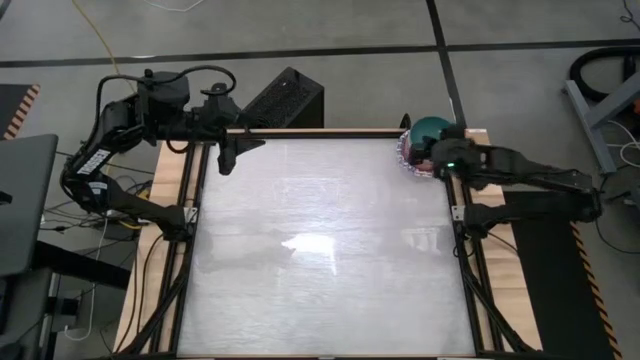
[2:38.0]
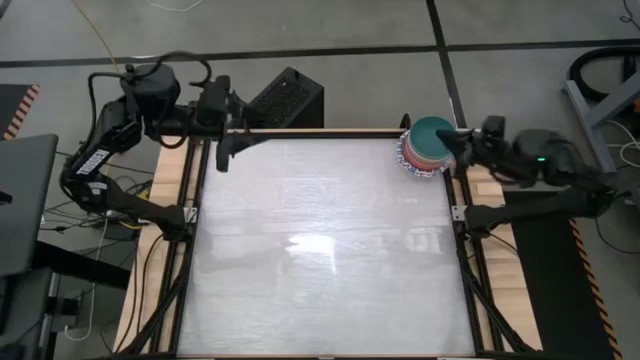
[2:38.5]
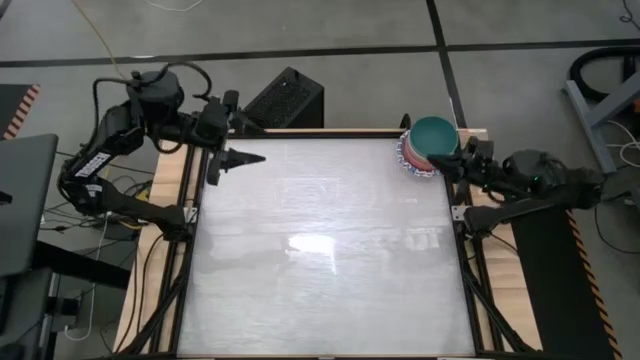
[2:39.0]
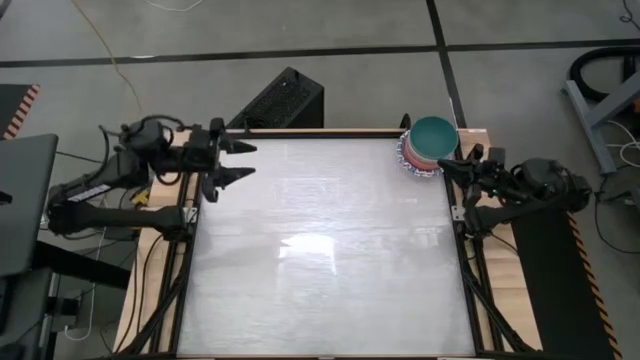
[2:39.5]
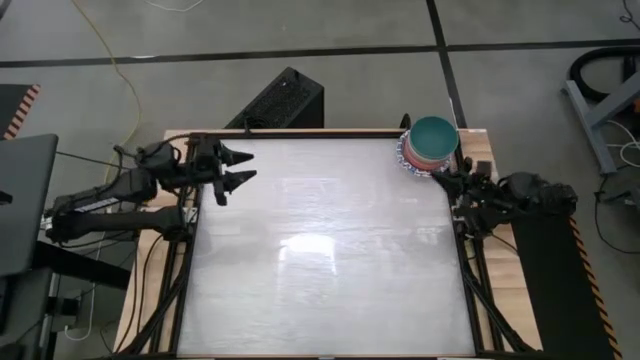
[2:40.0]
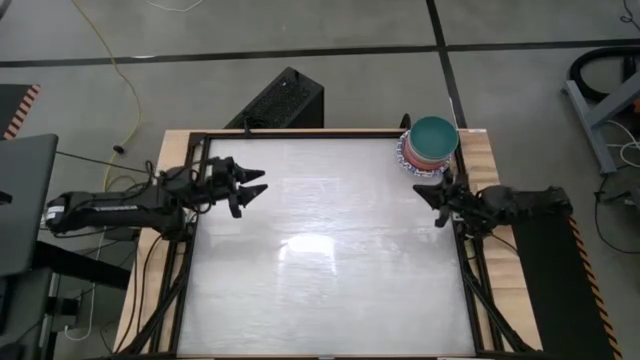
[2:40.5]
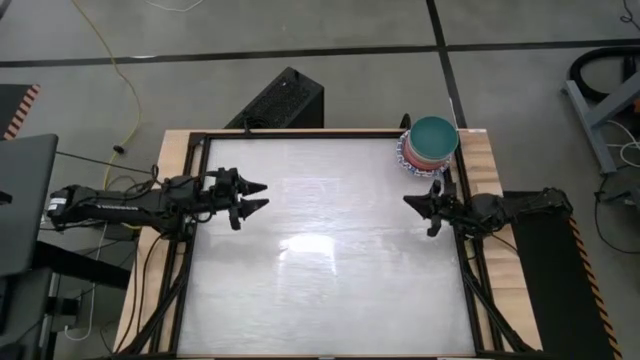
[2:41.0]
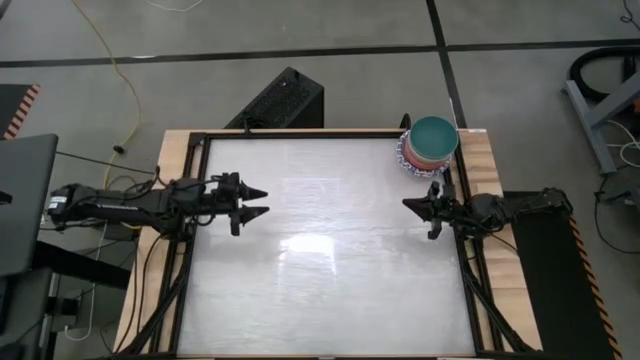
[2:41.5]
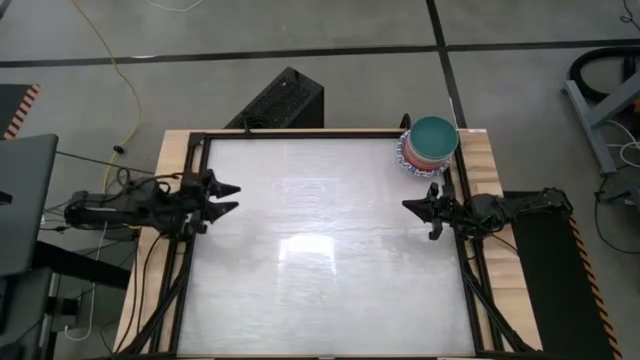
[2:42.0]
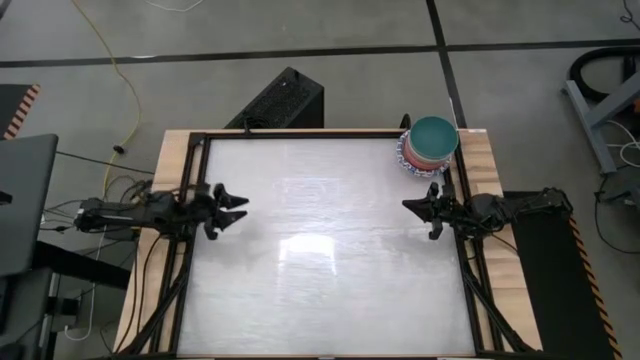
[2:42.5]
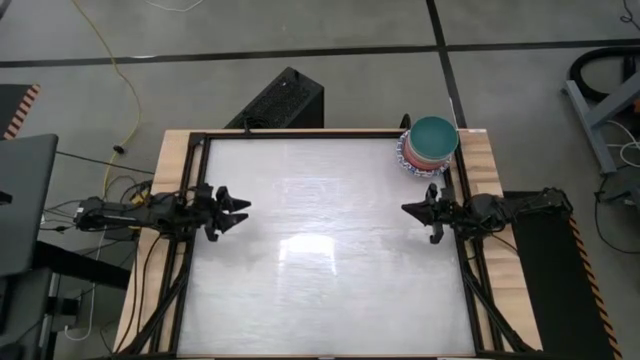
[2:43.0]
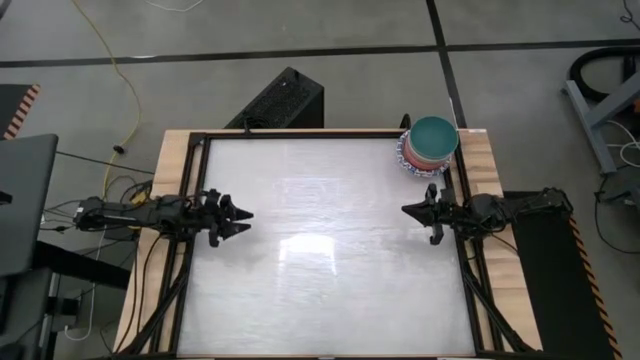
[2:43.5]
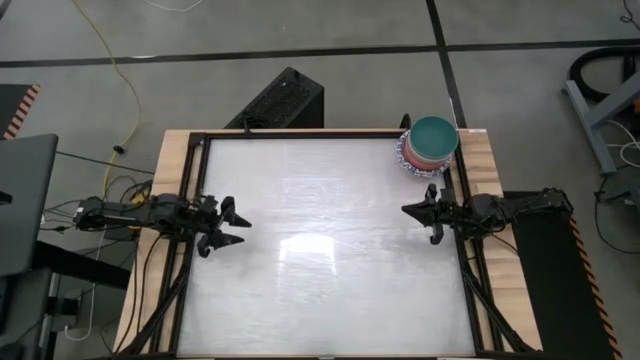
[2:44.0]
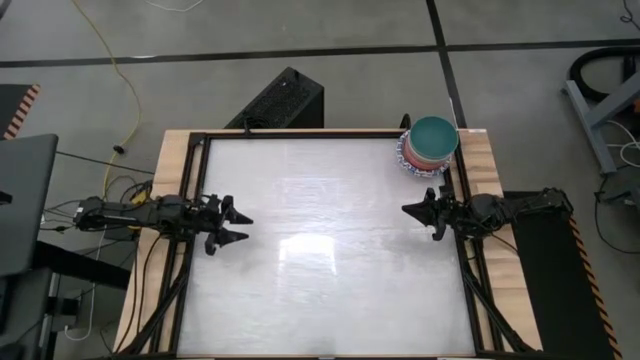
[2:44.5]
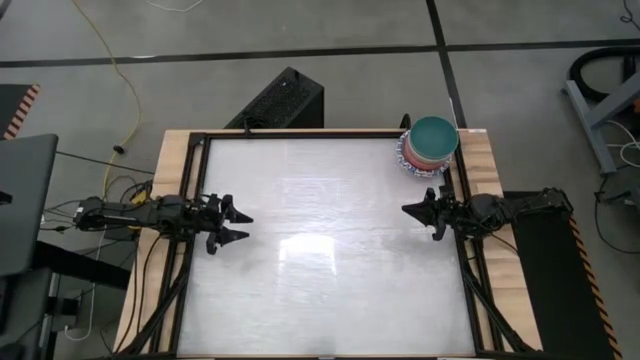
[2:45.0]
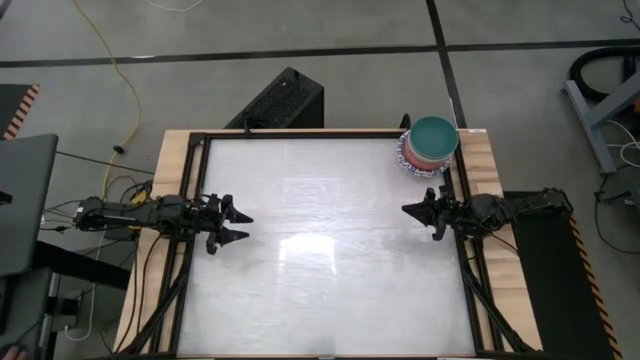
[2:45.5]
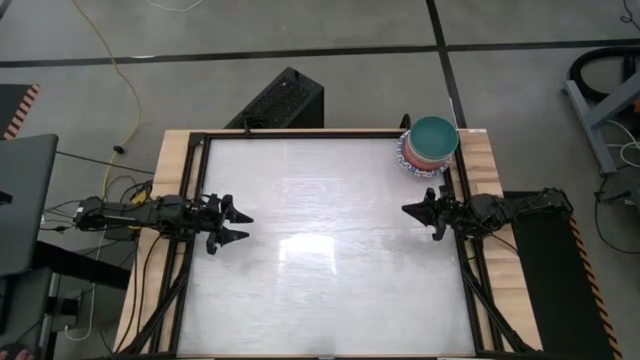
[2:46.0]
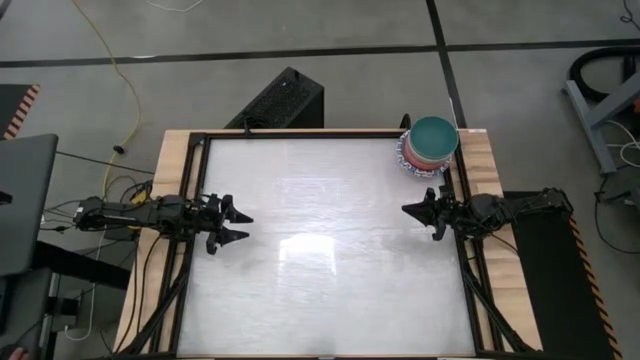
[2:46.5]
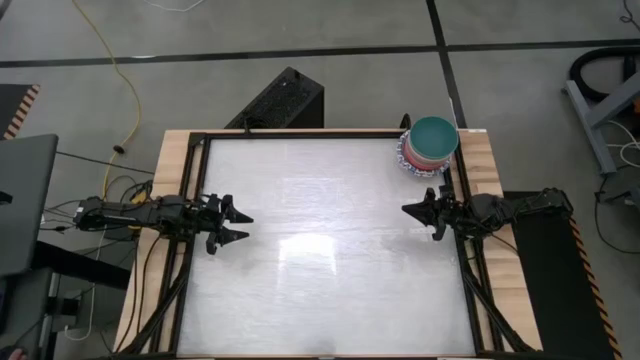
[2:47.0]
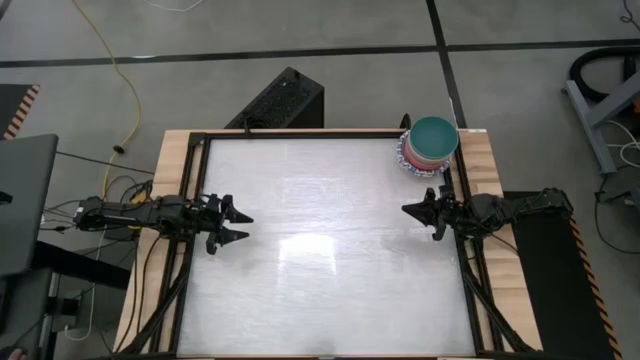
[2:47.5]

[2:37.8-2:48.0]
Return to Home Position

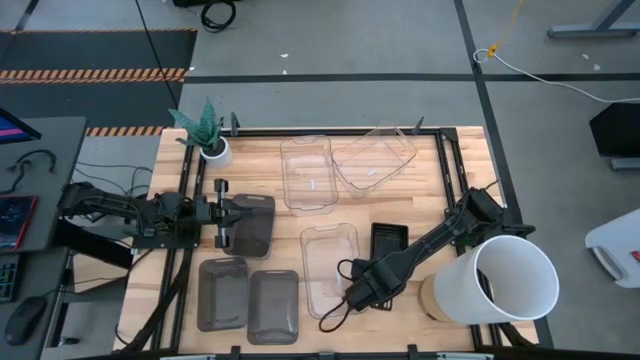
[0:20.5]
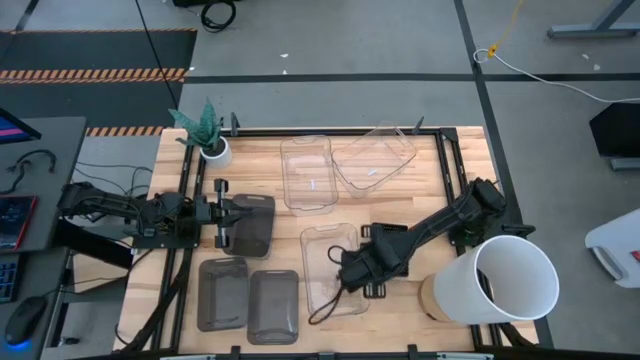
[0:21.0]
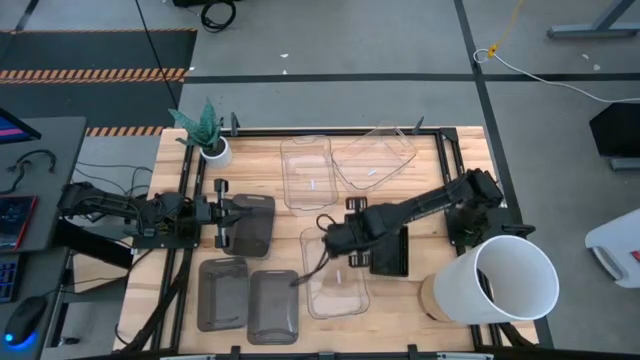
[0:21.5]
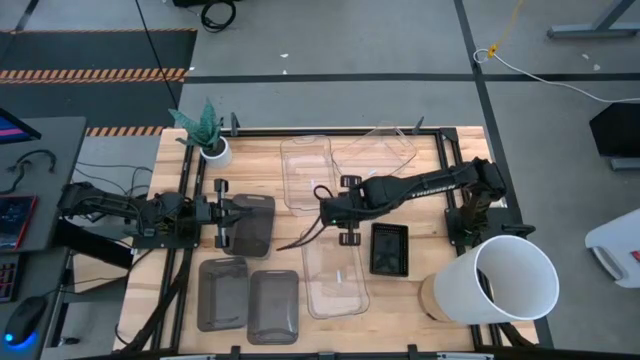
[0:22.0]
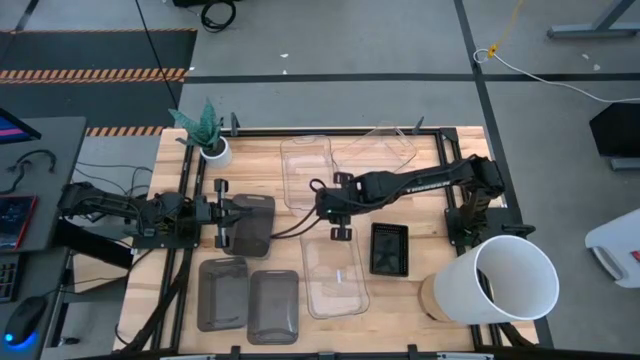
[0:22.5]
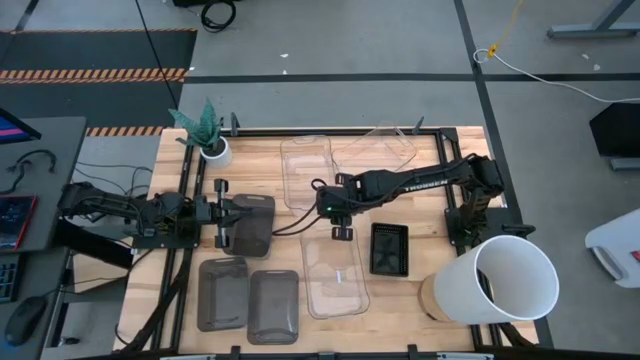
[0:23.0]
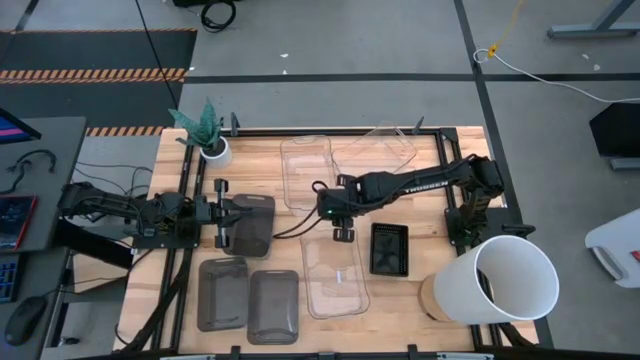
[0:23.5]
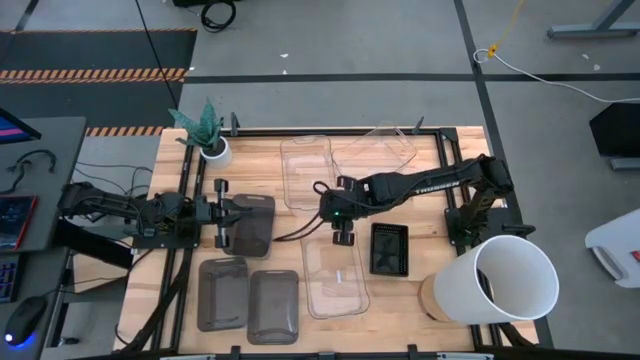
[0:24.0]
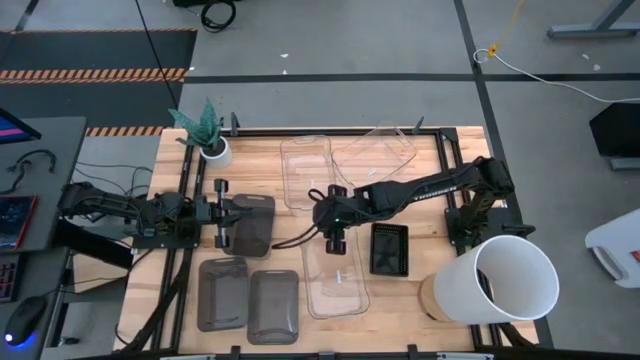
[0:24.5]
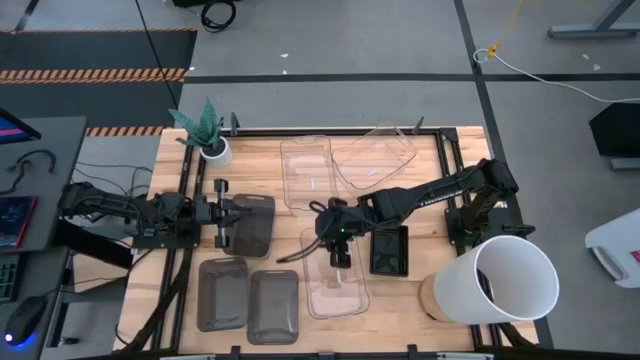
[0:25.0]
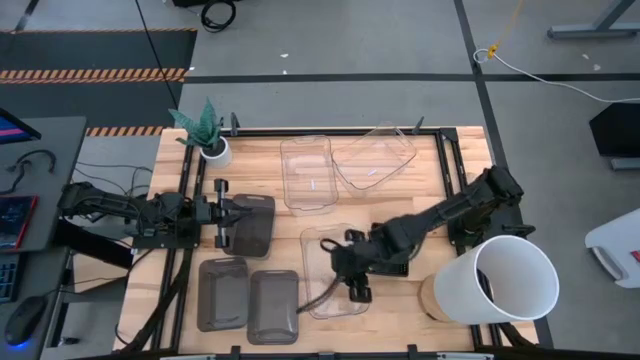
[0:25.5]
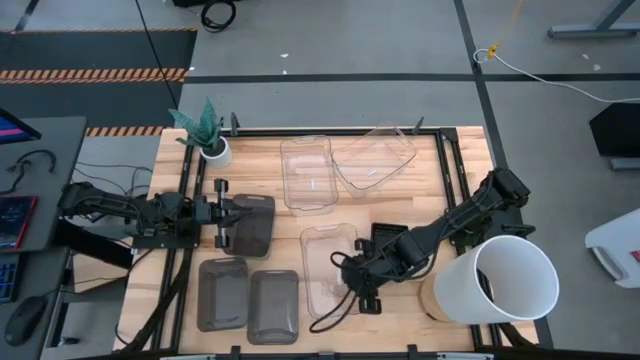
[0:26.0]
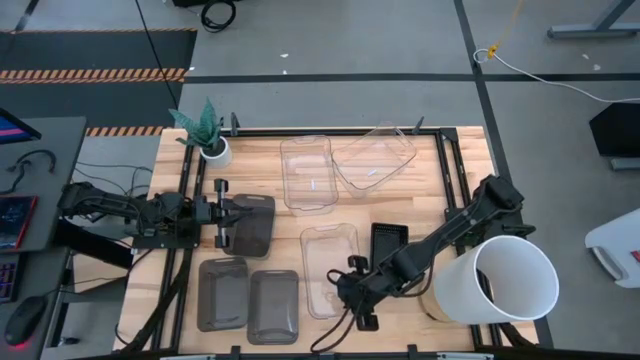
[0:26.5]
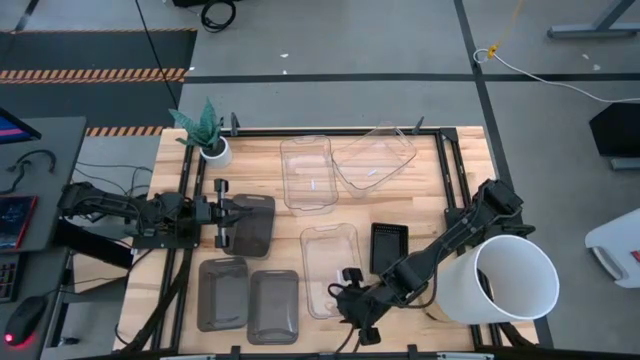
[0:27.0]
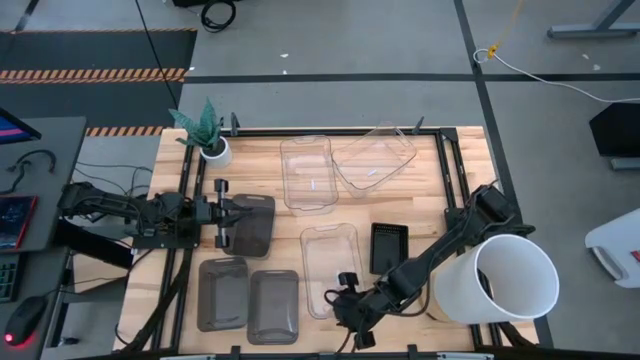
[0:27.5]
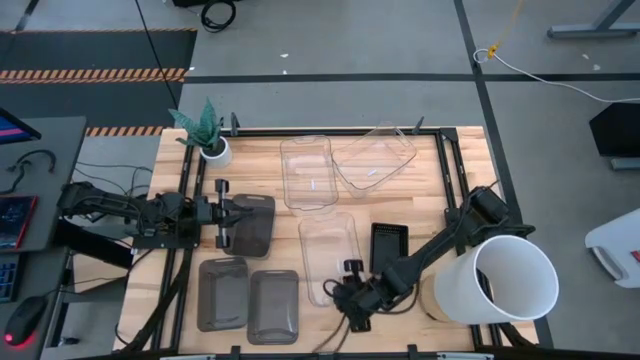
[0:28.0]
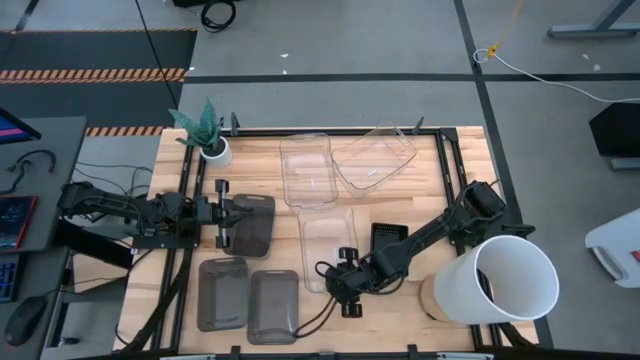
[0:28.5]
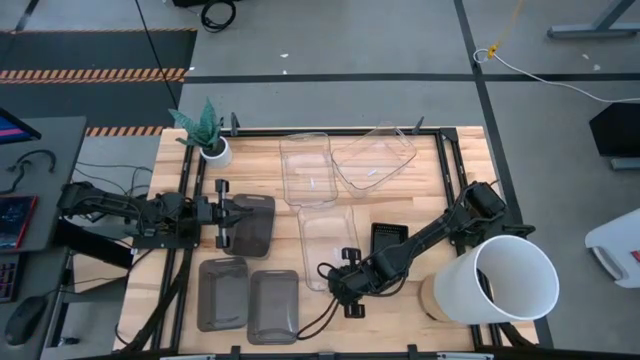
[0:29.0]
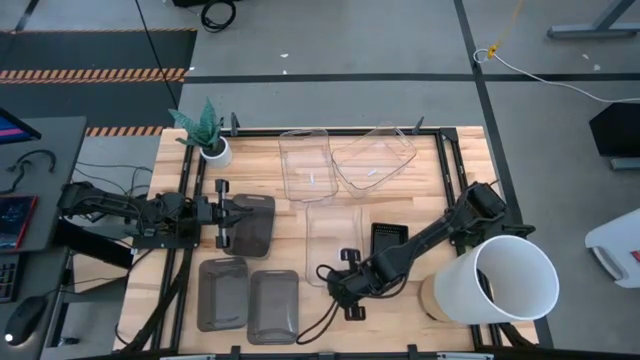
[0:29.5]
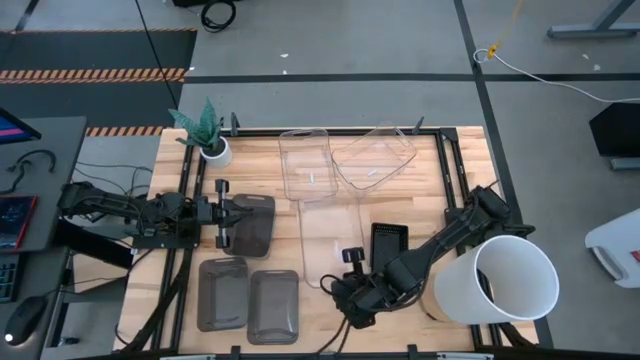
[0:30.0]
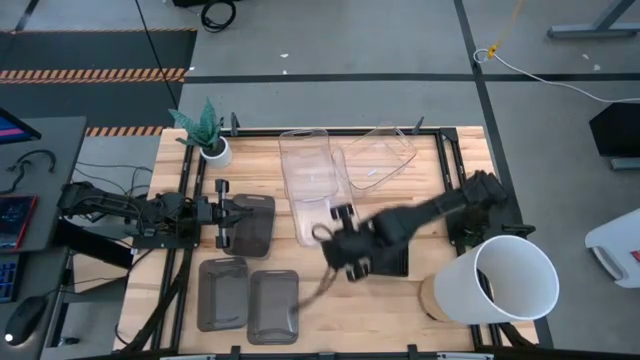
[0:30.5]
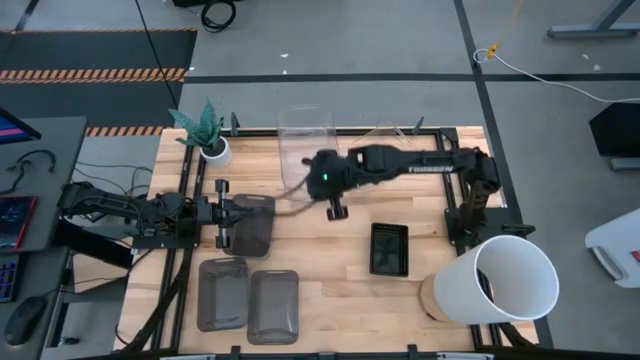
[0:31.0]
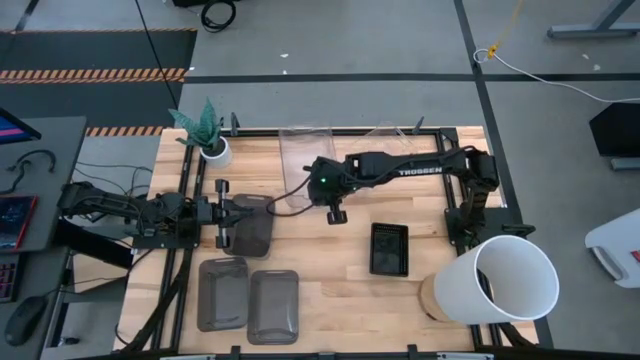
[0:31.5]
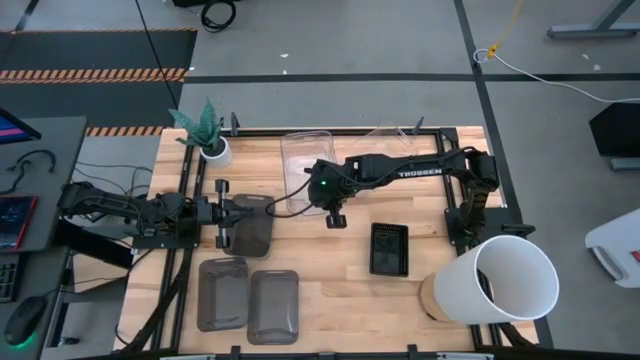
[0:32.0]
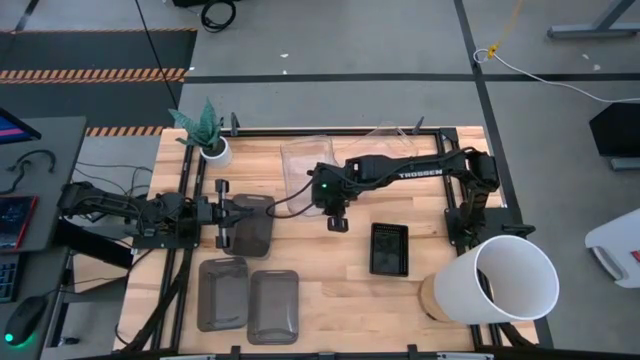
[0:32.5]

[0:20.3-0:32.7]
Stack the bottom transparent bin on the top left transparent bin
